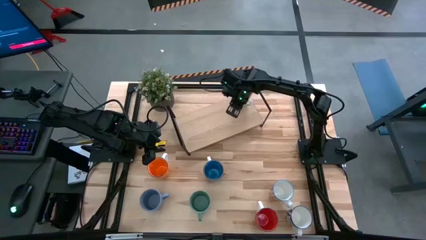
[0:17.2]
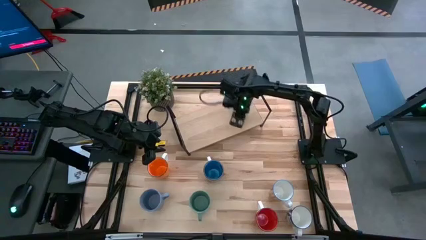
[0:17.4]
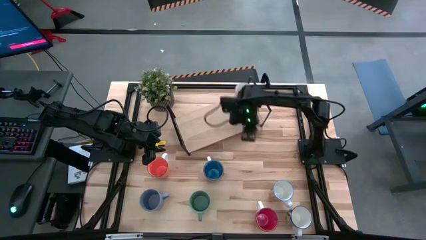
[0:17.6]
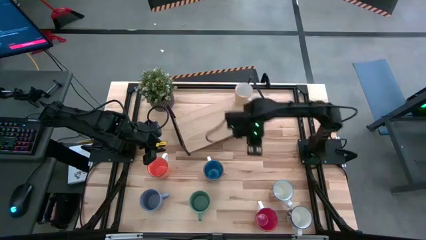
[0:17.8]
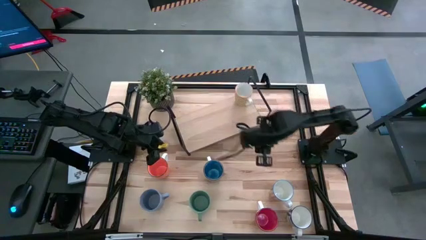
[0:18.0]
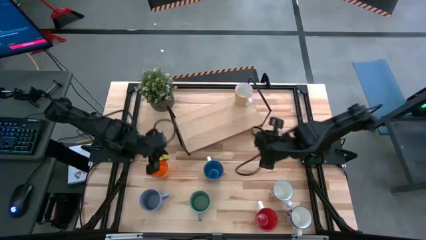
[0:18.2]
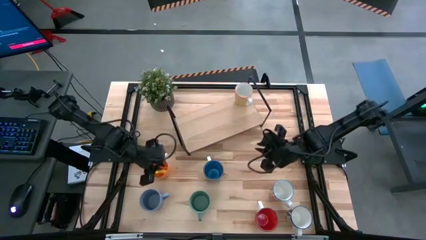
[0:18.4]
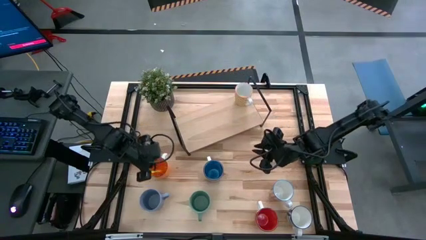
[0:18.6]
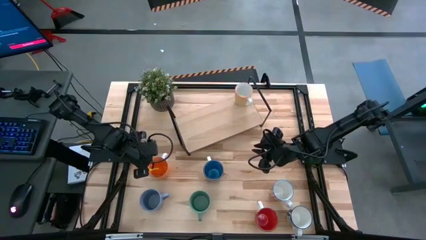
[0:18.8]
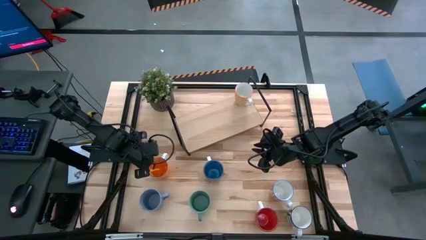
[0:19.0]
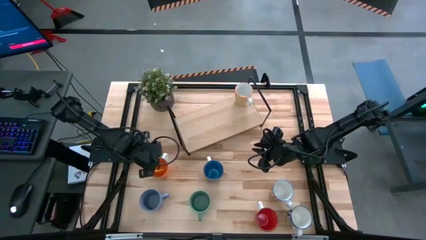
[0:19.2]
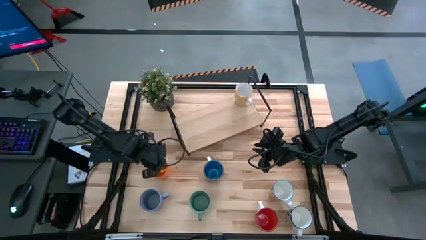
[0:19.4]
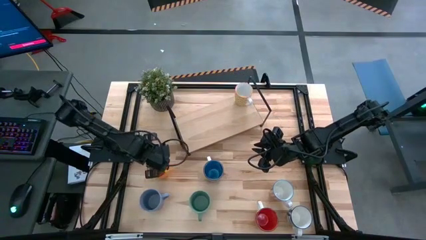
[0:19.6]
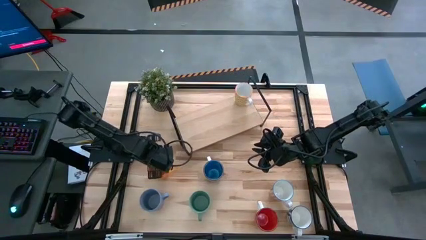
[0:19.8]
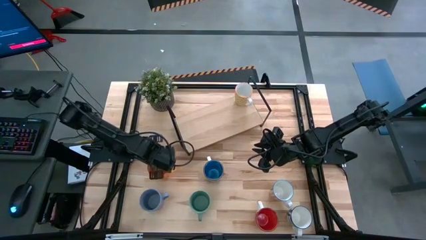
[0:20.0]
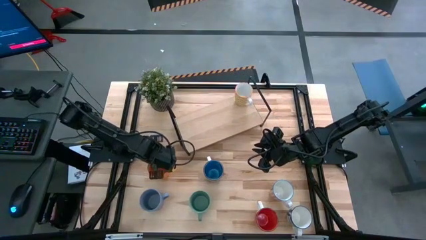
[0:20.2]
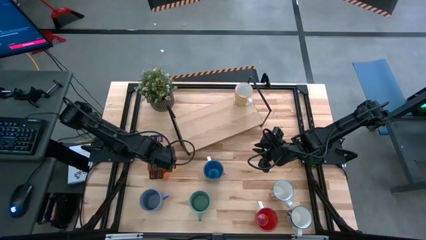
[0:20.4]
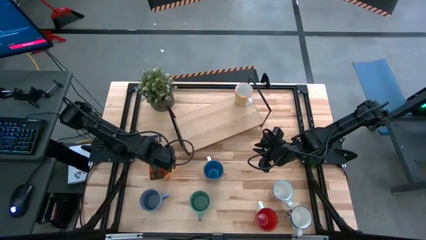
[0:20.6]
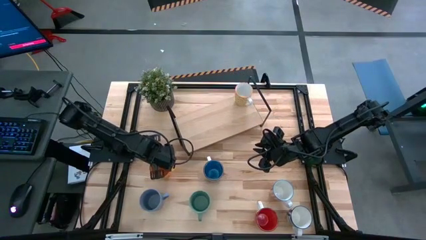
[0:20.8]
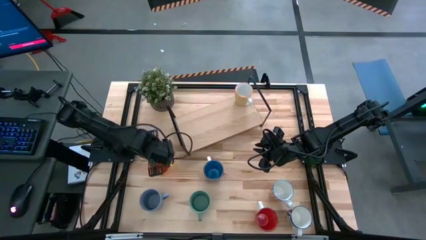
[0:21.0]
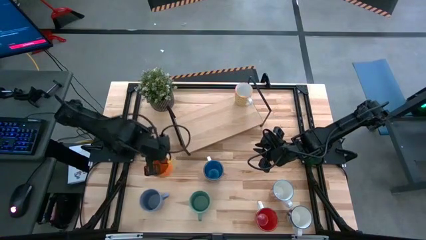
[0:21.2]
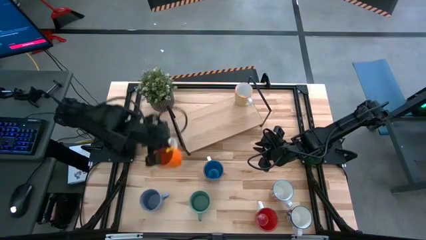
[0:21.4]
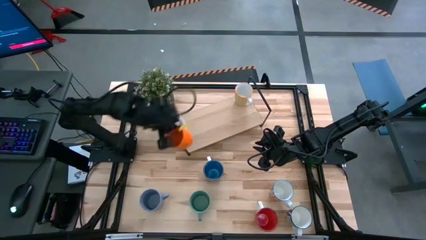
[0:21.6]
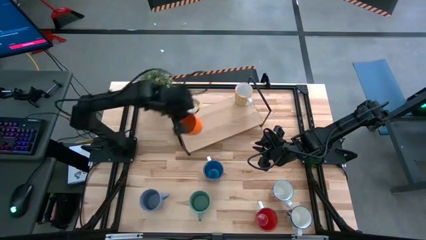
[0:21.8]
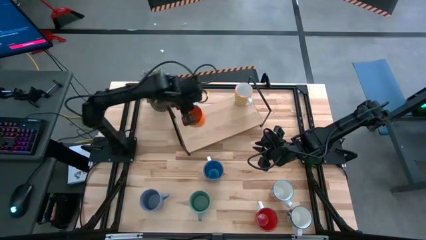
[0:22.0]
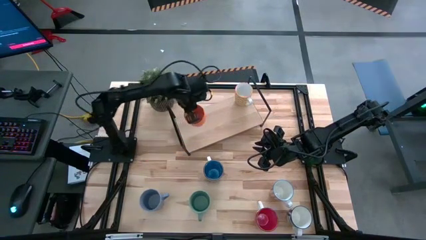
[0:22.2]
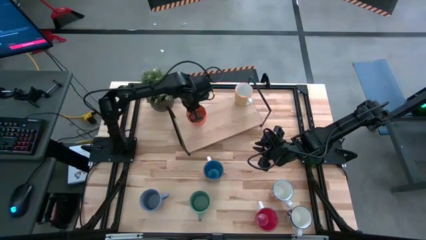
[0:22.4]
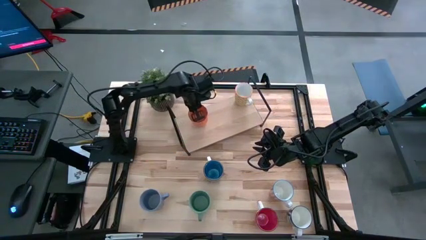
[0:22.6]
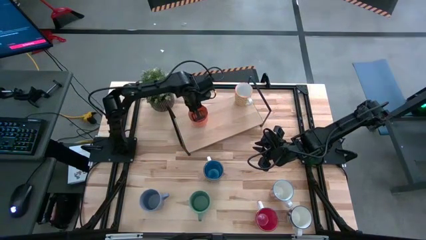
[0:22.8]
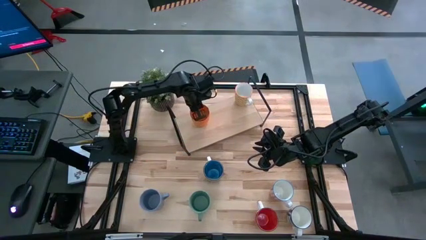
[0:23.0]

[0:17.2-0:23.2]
Task: Place coffee mugs
Put the orange mug on the shelf

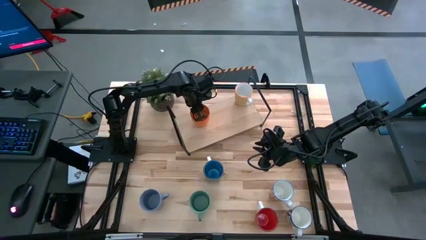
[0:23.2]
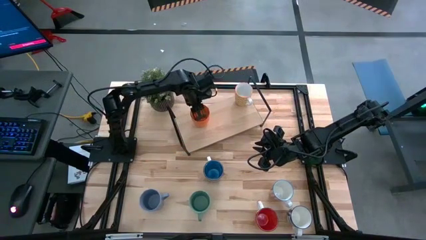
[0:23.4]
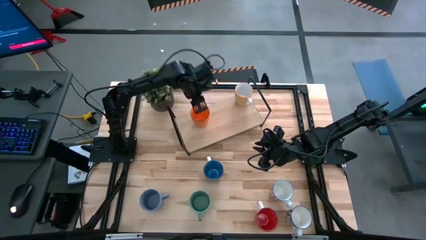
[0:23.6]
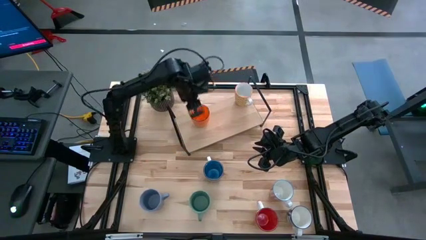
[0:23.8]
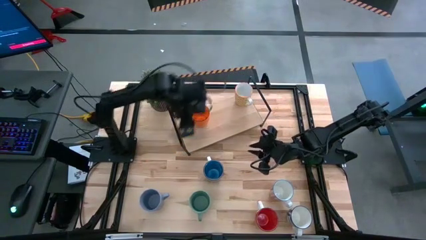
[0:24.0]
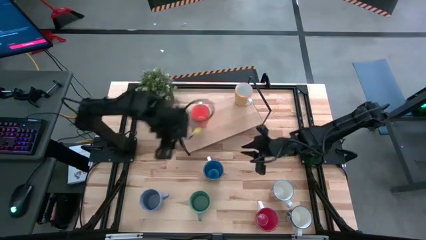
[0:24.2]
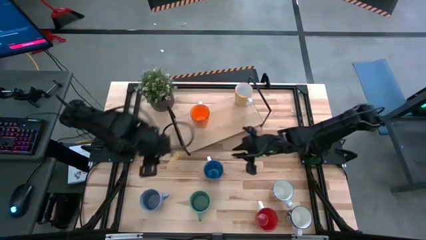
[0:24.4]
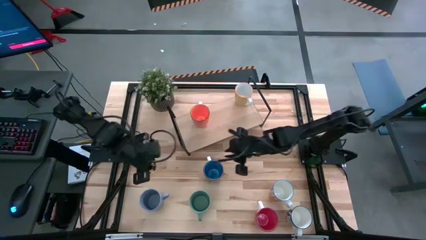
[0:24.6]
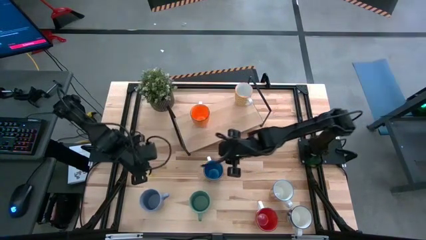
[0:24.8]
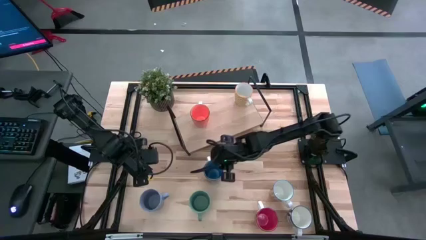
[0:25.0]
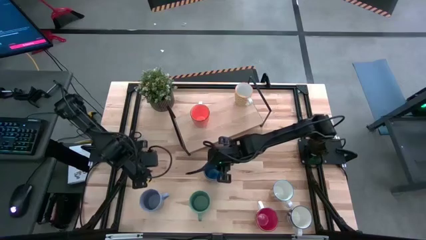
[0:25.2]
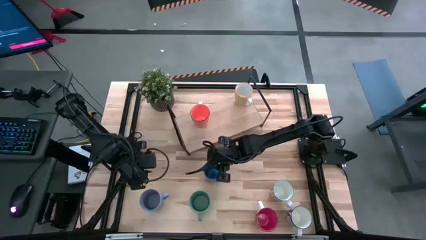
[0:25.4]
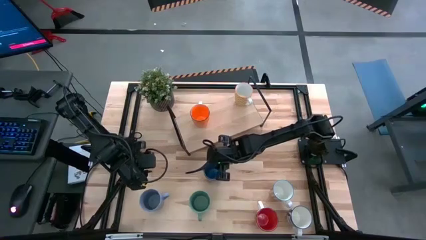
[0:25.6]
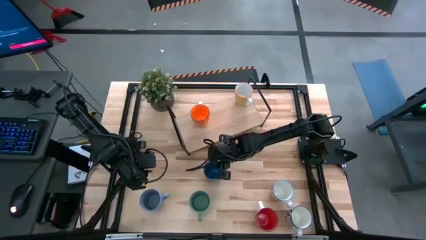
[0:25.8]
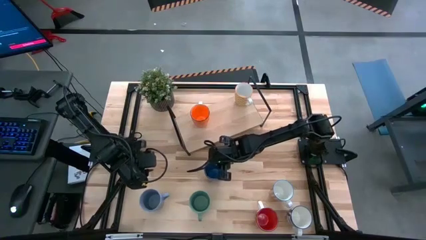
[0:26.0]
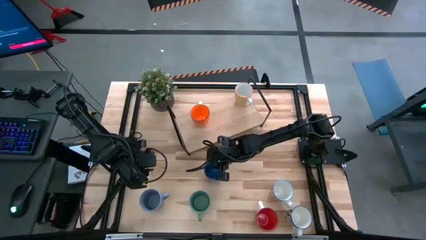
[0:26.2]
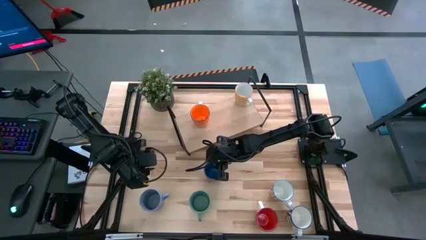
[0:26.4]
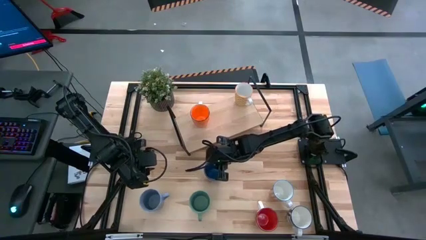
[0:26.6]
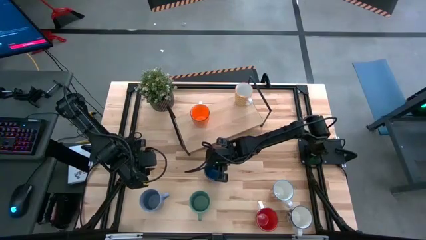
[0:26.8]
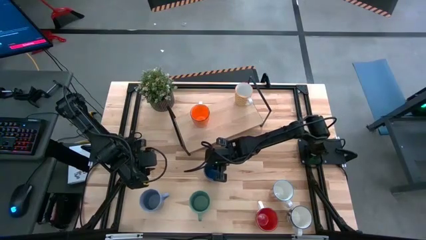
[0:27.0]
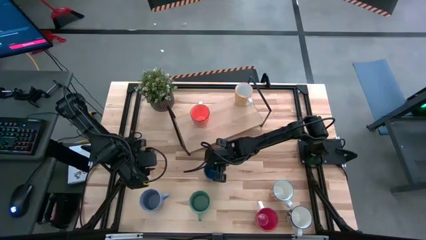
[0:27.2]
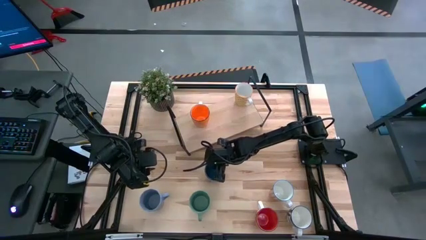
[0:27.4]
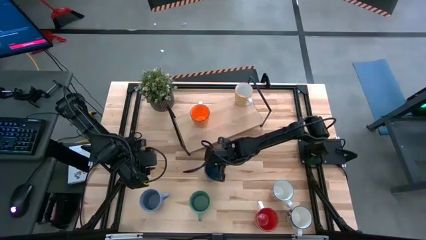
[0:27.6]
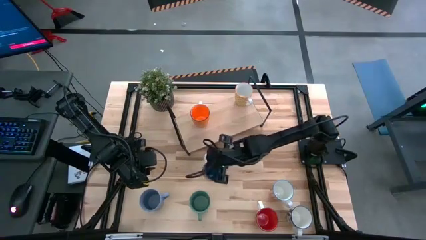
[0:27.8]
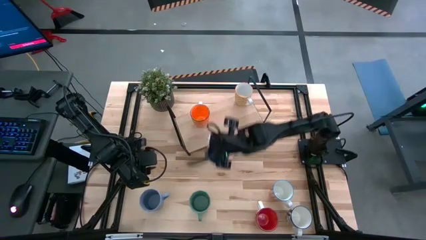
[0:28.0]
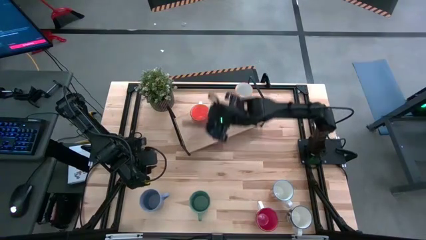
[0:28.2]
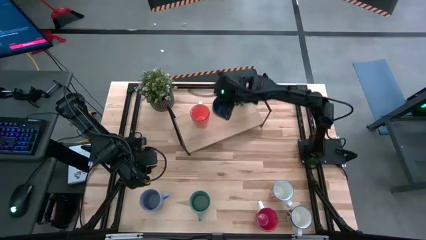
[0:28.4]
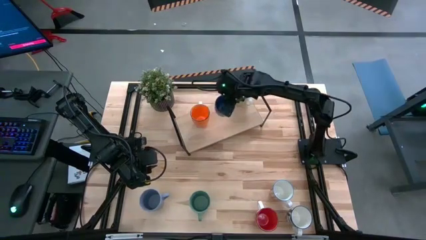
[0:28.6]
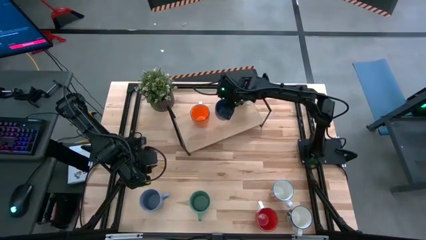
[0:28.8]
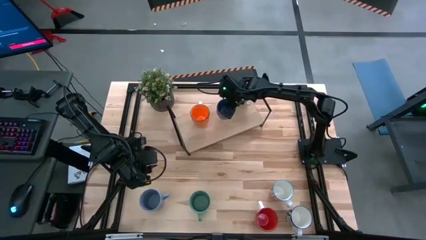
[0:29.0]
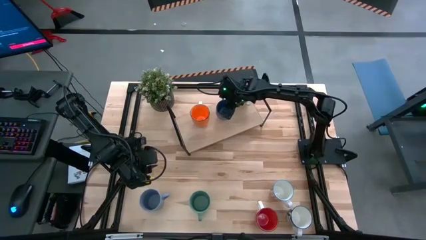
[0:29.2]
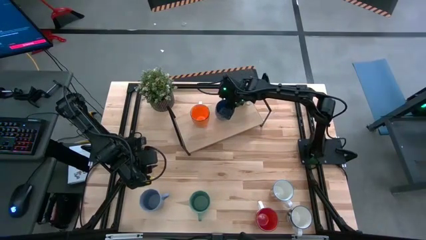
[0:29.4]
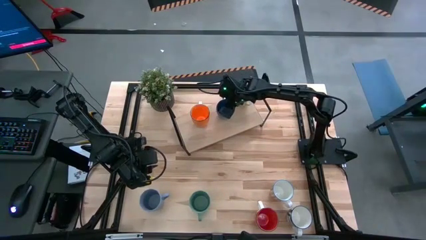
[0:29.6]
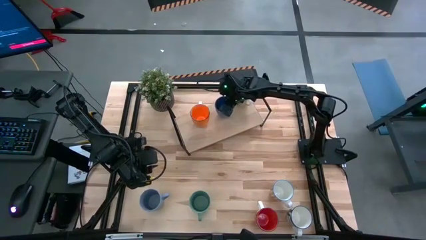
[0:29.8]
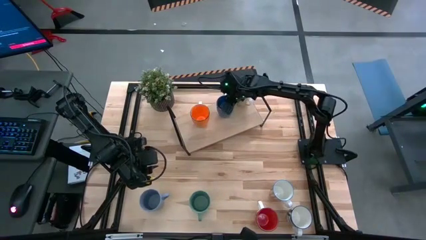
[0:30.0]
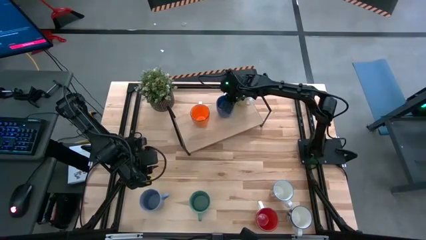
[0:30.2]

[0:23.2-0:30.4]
Put blue mug on the shelf

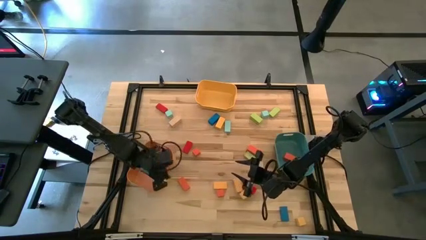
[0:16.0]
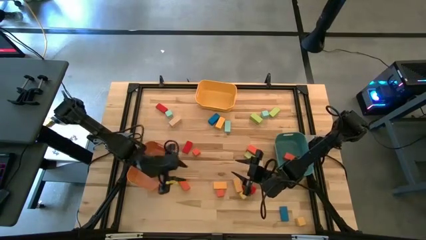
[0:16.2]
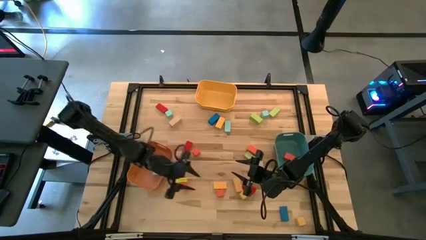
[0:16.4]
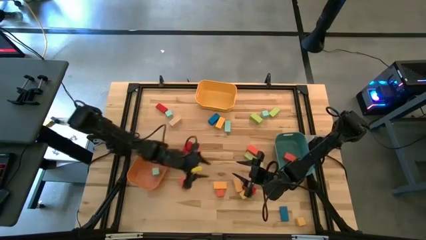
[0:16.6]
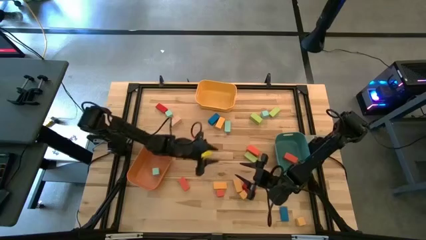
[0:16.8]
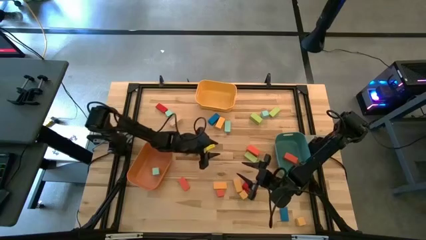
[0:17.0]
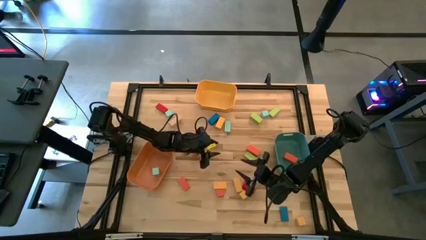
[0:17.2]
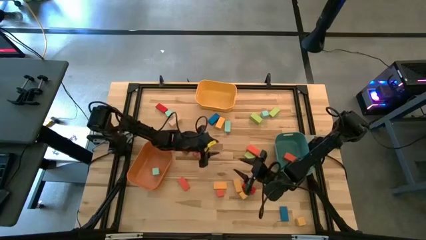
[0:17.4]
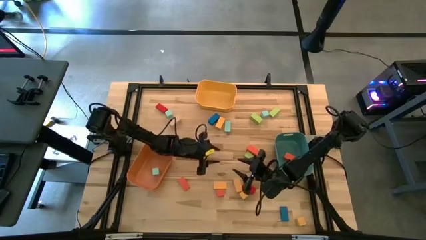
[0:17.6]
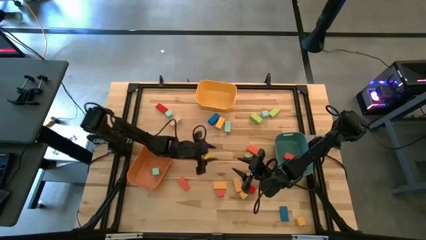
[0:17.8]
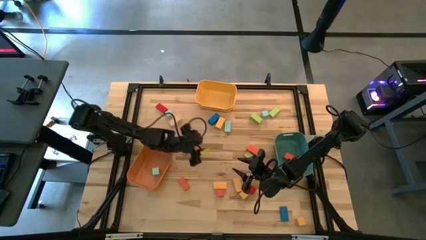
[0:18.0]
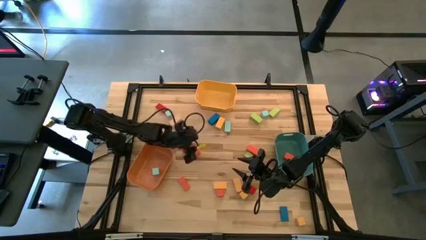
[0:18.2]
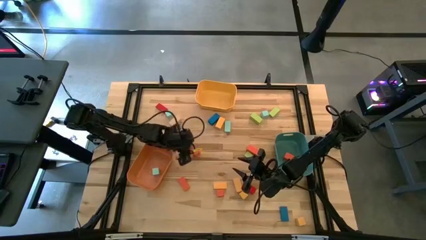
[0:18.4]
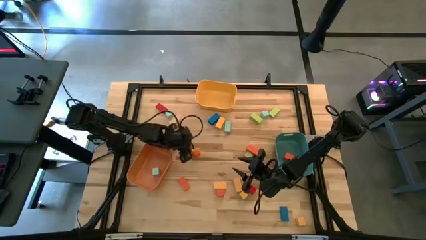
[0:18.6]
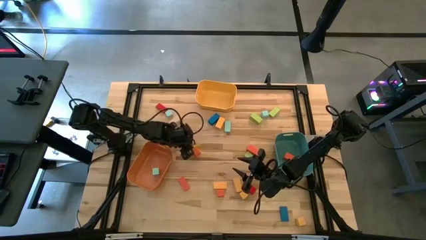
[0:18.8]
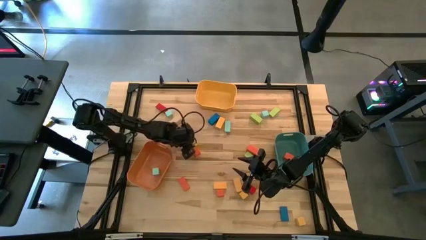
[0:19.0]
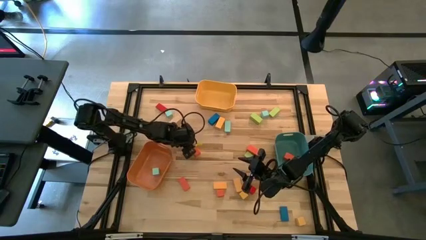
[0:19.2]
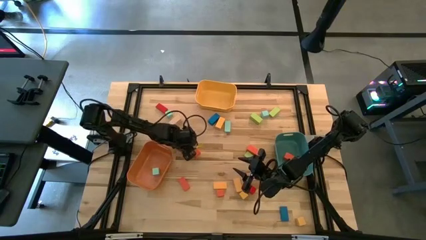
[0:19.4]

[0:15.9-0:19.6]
Task: Sort blocks by size
Put the thin red rectangle block into the yellow bin
